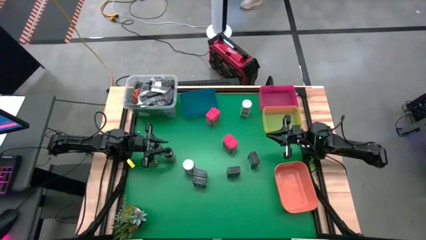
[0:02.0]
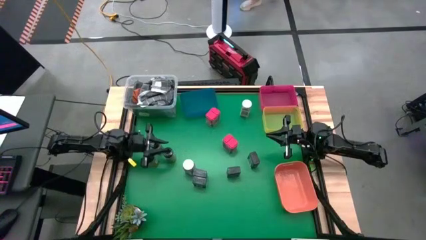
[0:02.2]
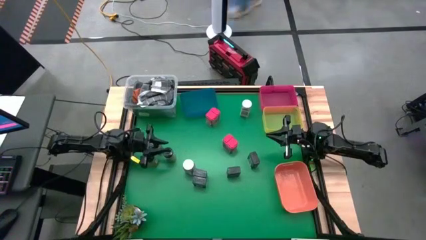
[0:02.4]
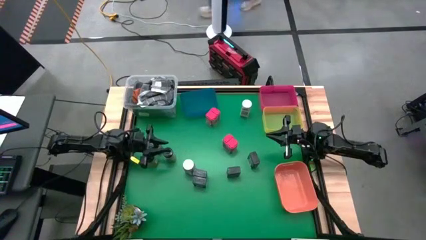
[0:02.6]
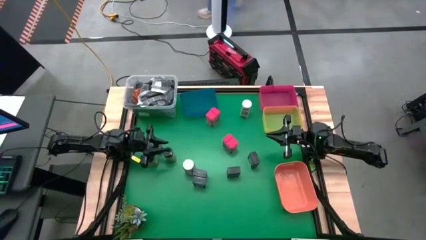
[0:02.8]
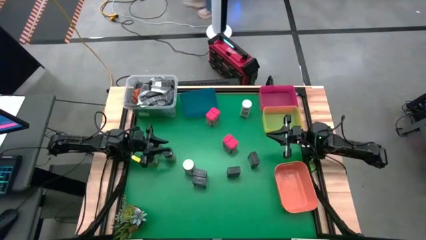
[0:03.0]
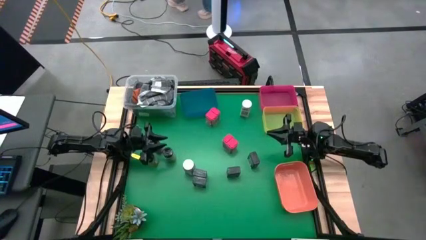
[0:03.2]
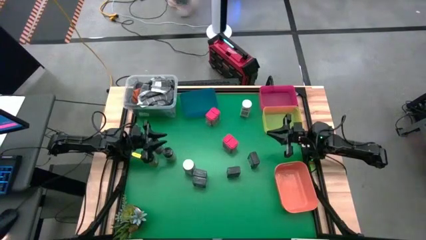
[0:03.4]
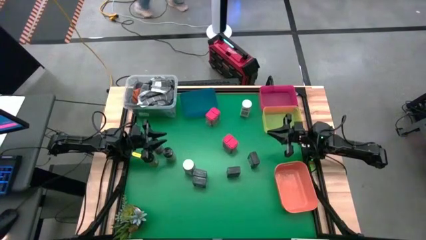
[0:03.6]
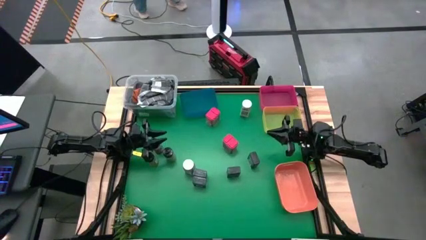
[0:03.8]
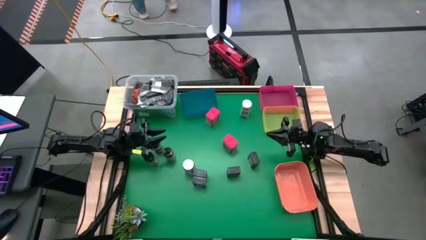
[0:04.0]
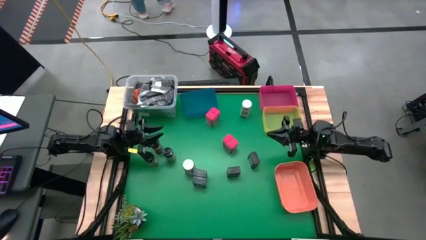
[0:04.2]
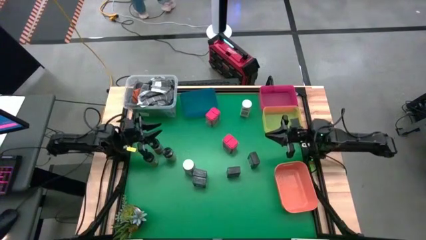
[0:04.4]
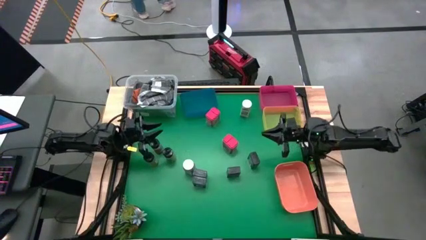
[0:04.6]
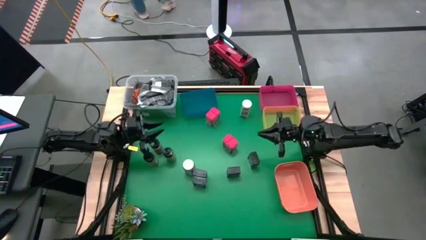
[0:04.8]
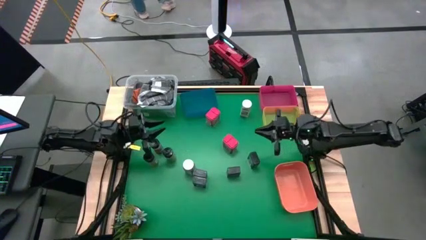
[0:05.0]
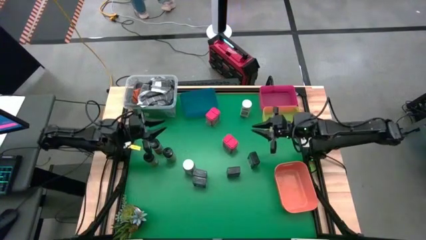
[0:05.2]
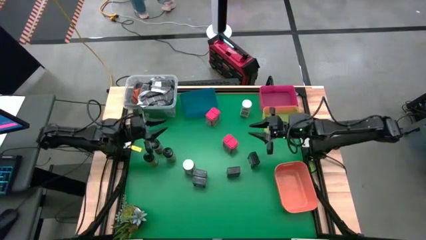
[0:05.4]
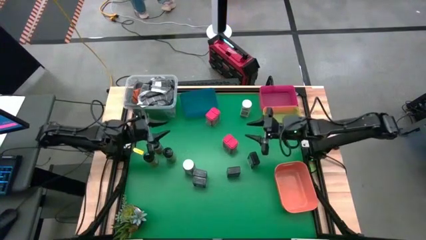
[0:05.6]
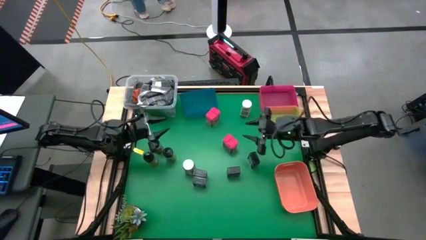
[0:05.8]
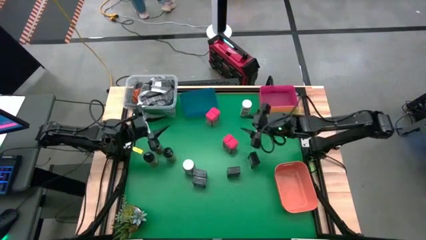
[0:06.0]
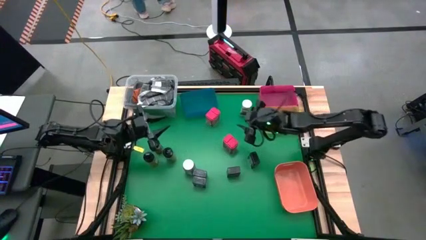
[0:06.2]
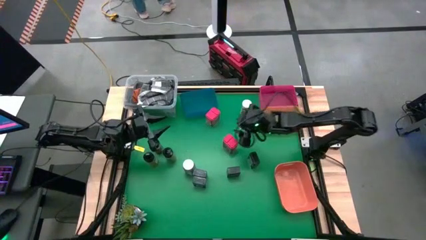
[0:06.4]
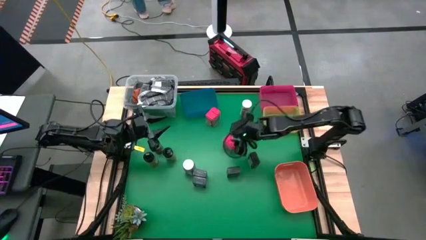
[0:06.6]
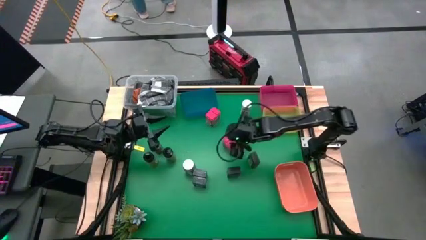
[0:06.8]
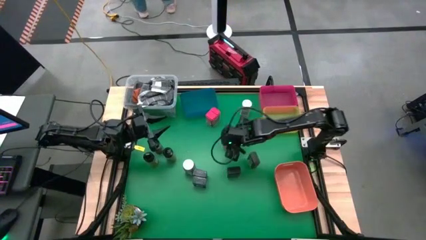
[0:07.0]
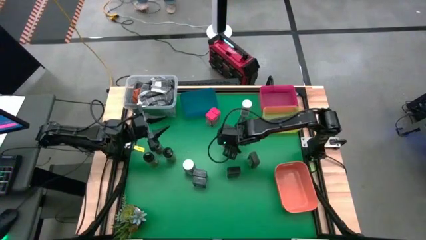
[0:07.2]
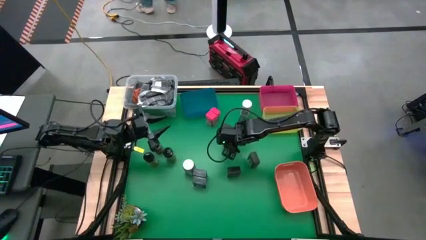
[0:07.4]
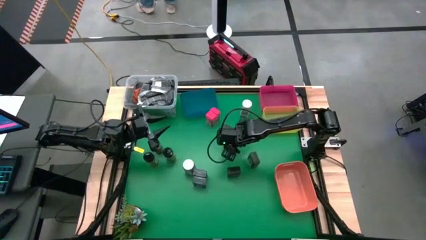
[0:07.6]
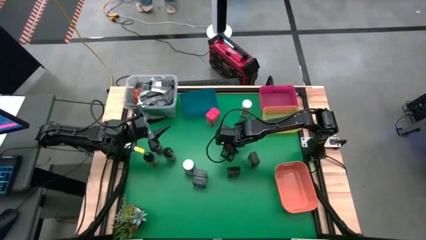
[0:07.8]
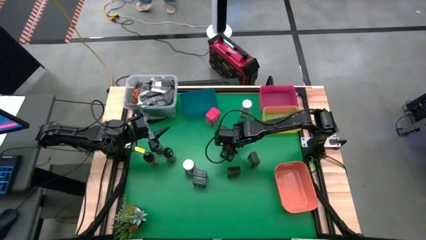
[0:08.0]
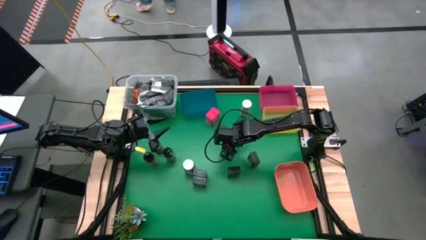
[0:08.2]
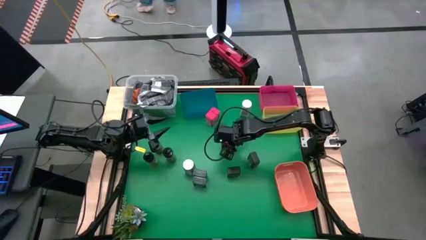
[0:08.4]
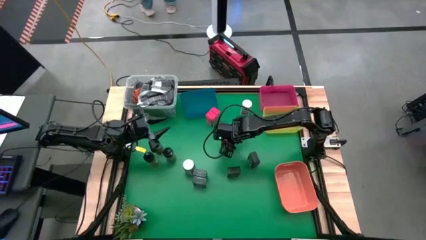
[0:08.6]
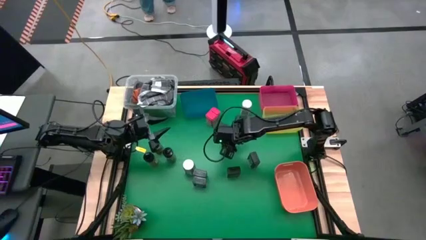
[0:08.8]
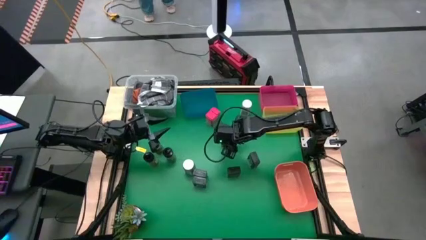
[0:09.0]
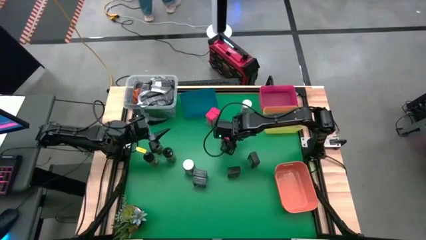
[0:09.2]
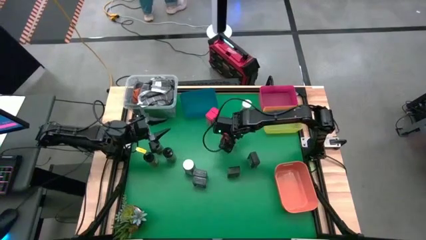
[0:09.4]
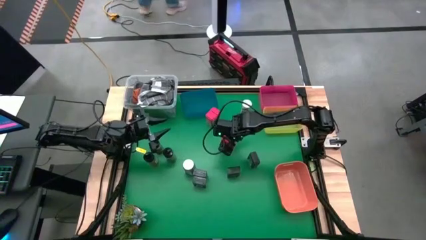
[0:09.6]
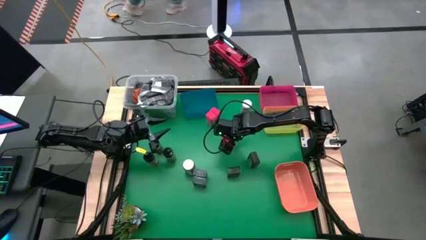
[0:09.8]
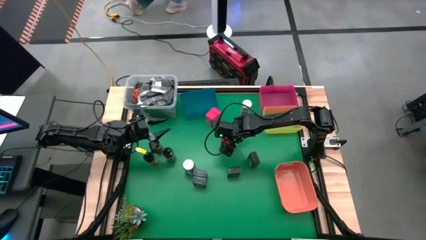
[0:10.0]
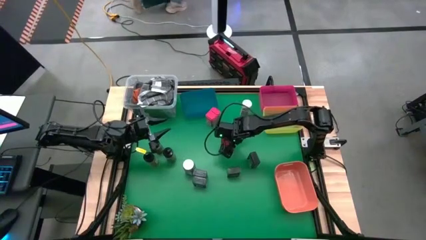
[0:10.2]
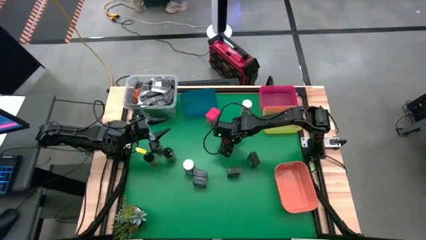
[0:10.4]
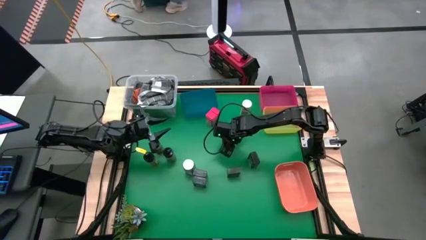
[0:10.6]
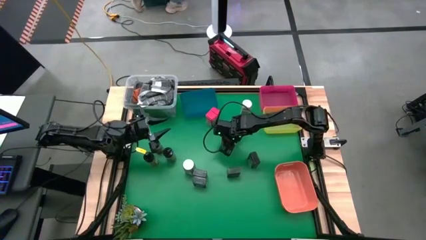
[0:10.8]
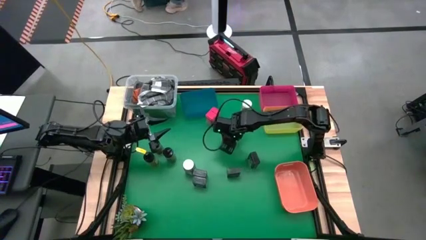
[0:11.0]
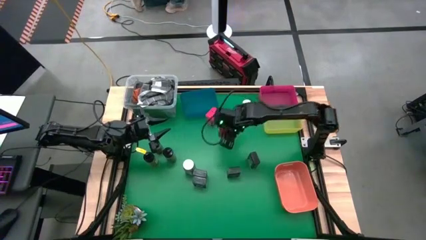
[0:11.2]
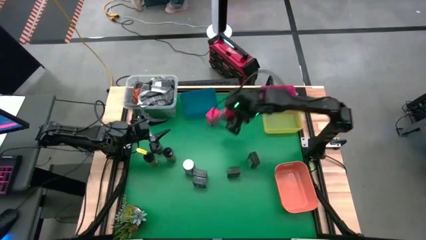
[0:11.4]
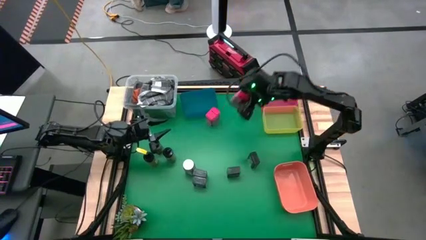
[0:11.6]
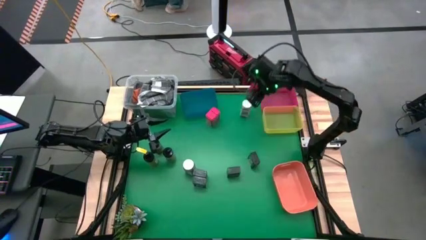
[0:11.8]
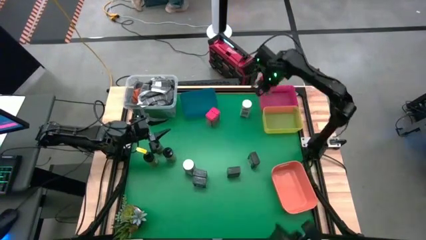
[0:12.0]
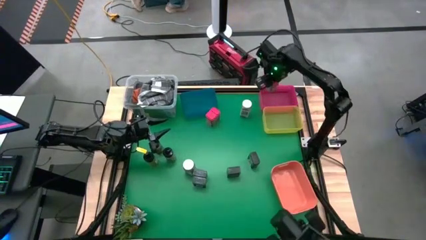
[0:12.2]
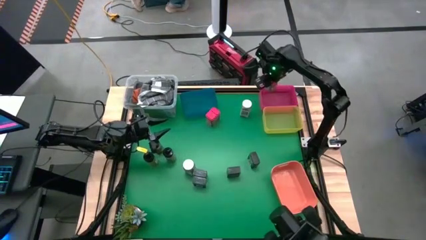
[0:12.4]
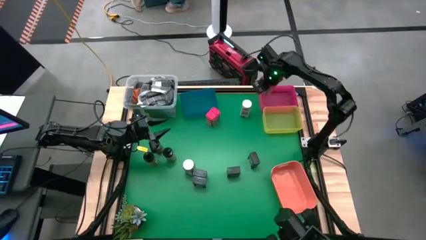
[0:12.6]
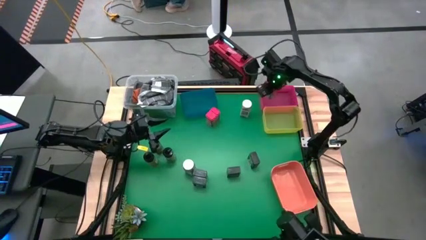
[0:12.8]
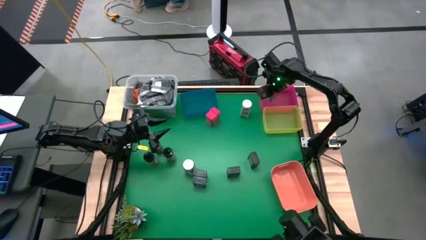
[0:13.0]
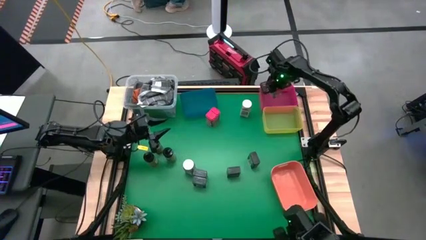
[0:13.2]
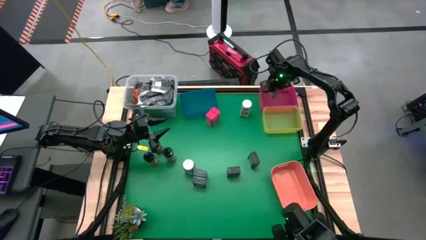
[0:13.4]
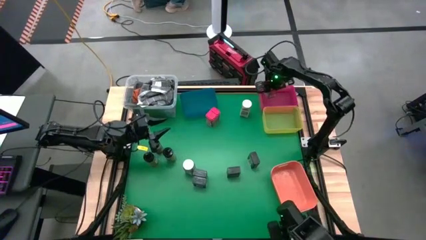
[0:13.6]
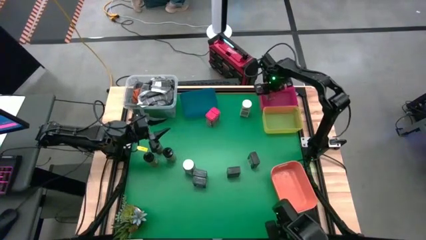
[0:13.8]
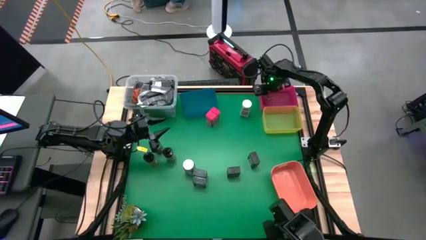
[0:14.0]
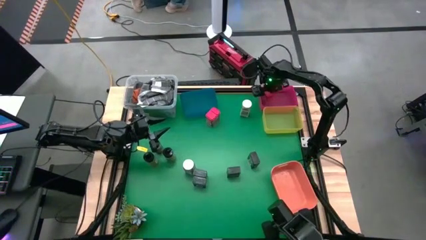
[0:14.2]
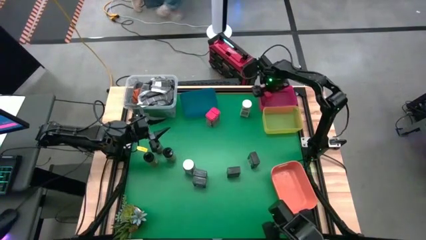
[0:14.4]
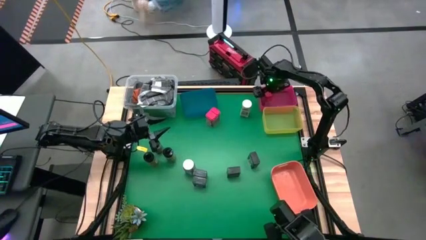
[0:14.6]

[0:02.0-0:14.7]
Task: Sort spices by type
Put the red seasoning from the middle into the red bin
